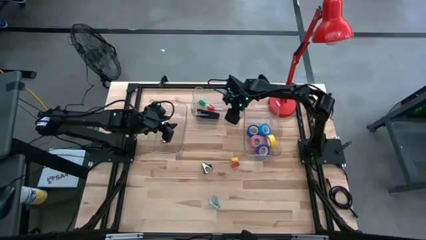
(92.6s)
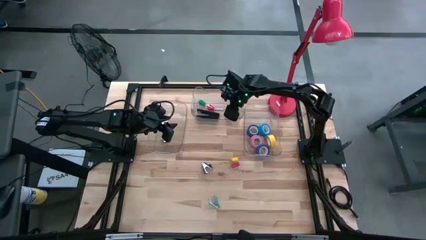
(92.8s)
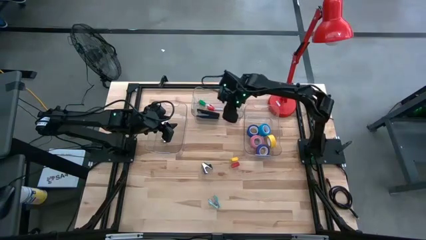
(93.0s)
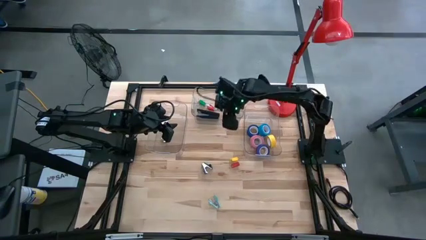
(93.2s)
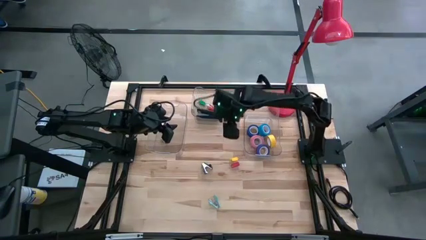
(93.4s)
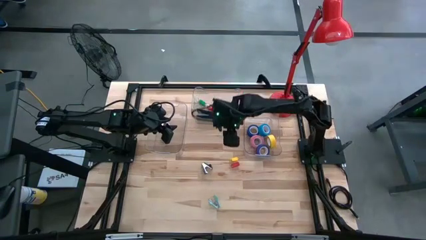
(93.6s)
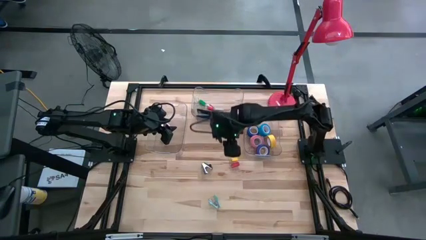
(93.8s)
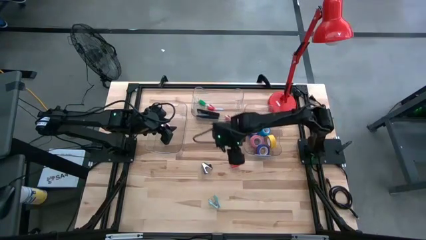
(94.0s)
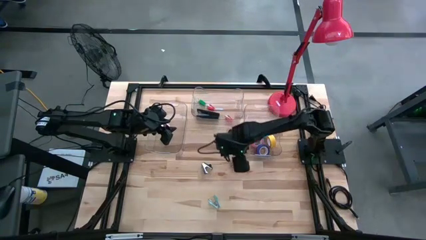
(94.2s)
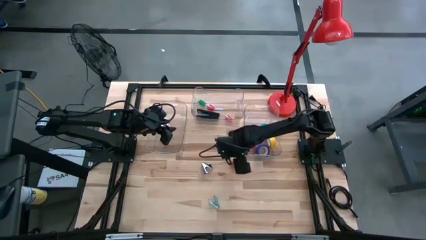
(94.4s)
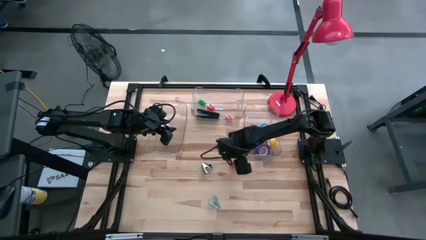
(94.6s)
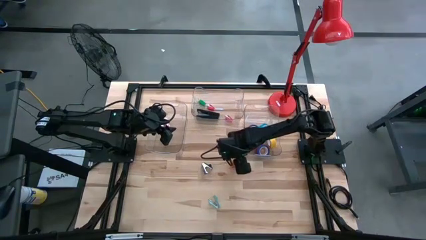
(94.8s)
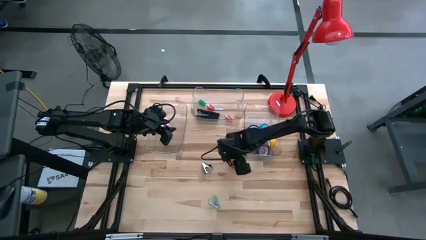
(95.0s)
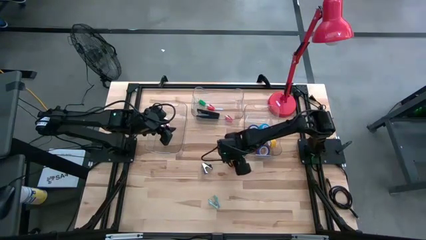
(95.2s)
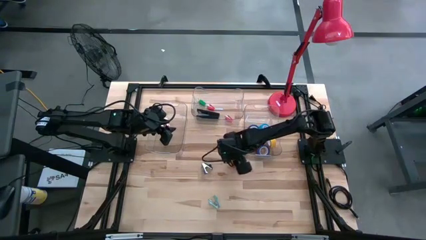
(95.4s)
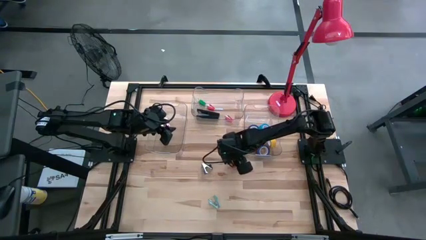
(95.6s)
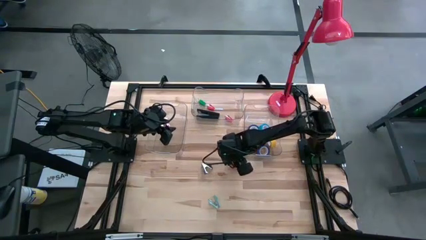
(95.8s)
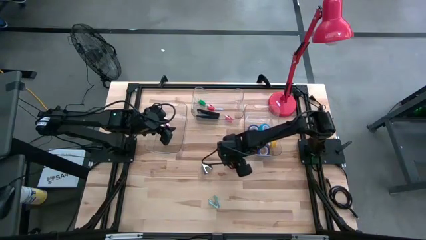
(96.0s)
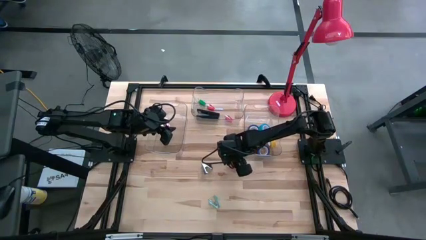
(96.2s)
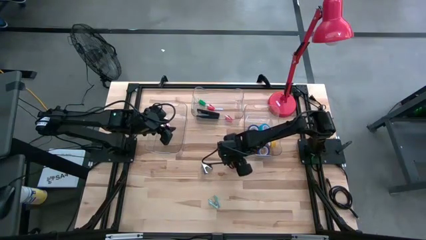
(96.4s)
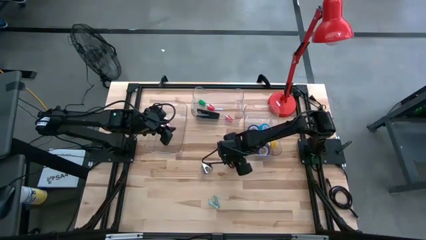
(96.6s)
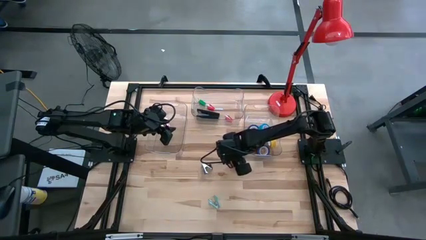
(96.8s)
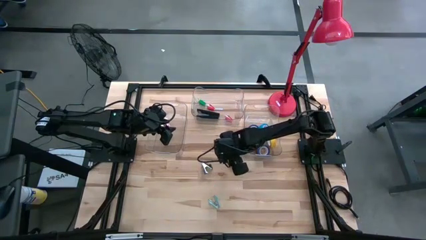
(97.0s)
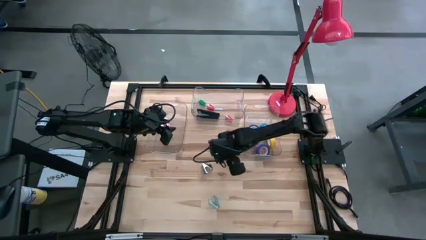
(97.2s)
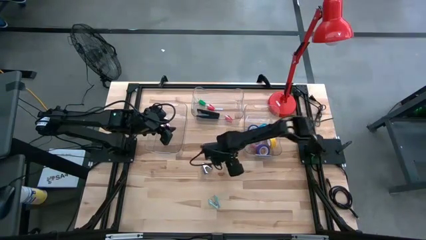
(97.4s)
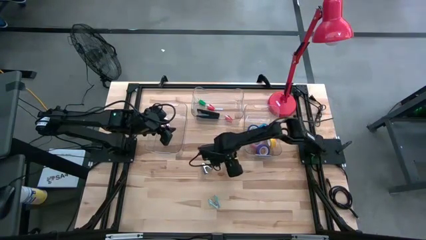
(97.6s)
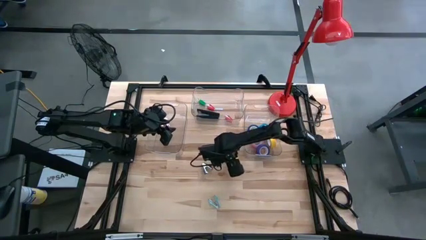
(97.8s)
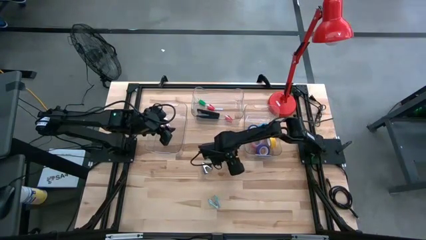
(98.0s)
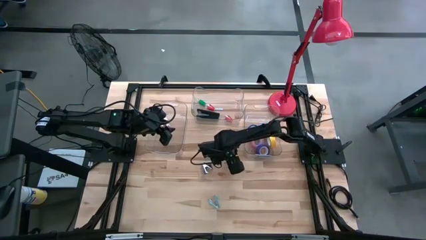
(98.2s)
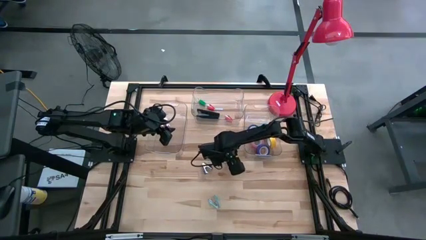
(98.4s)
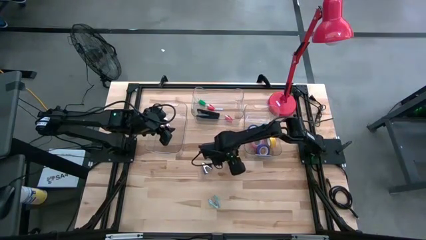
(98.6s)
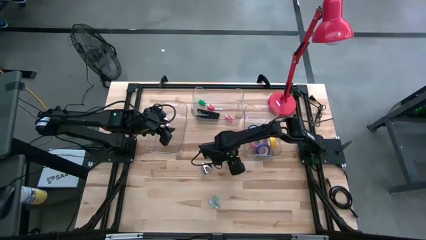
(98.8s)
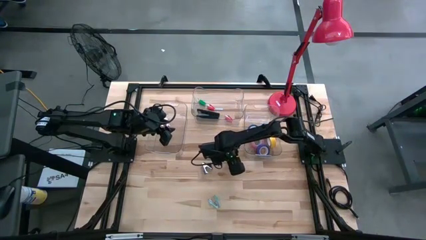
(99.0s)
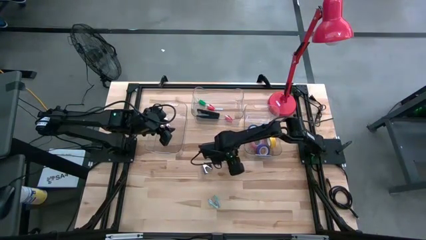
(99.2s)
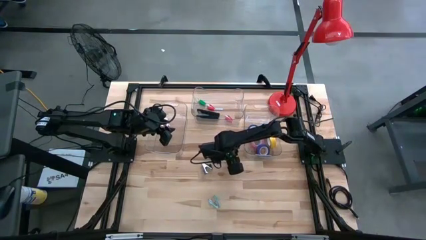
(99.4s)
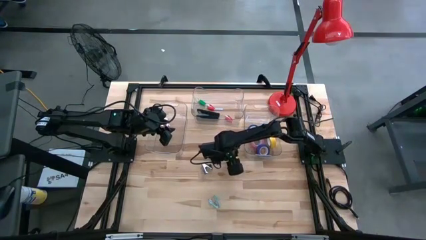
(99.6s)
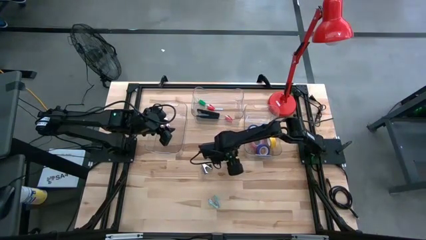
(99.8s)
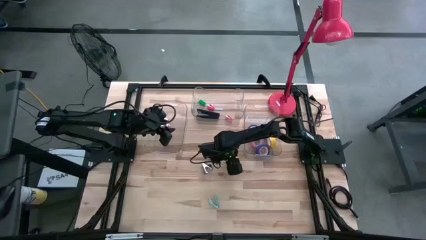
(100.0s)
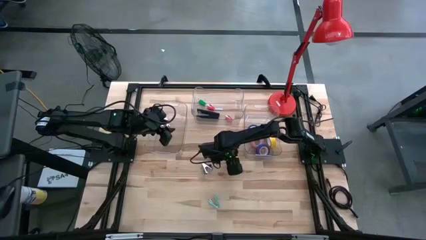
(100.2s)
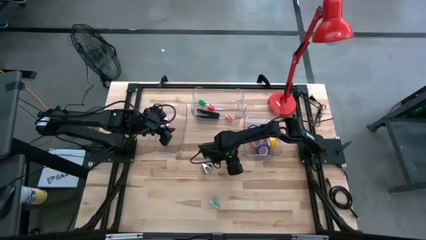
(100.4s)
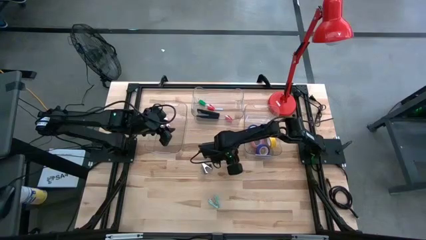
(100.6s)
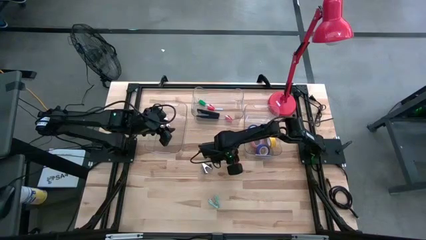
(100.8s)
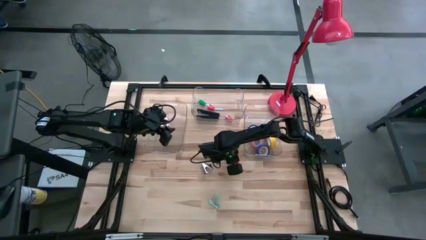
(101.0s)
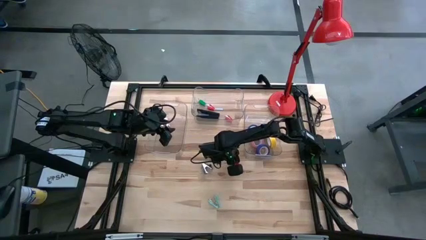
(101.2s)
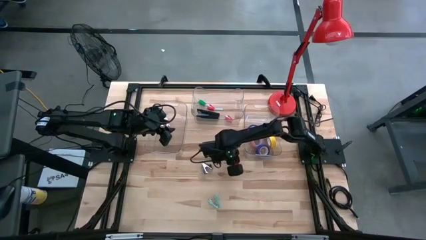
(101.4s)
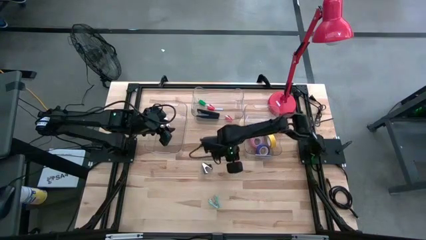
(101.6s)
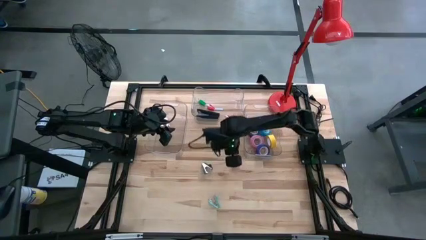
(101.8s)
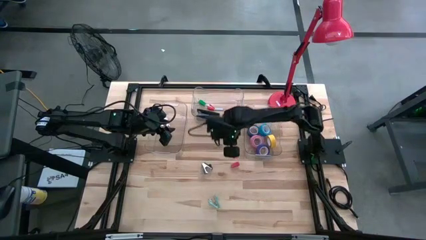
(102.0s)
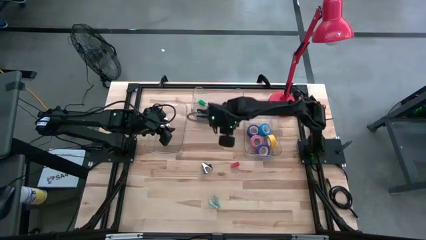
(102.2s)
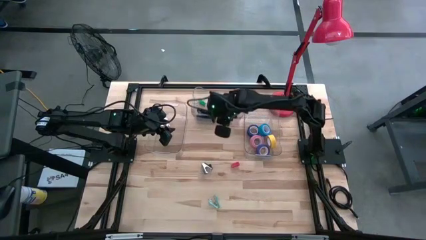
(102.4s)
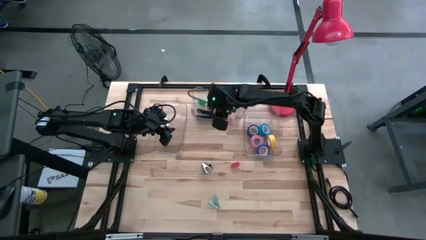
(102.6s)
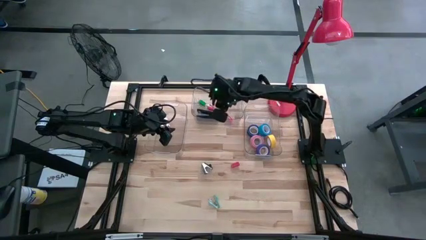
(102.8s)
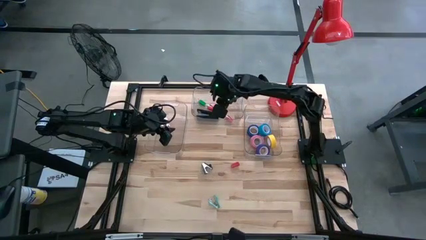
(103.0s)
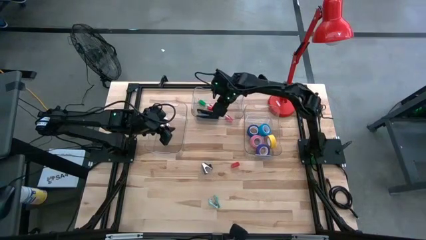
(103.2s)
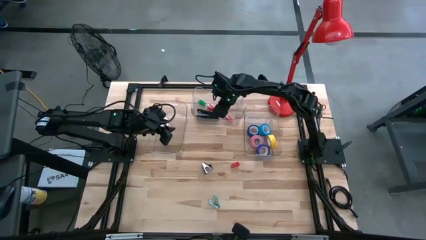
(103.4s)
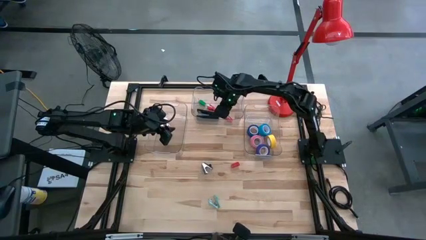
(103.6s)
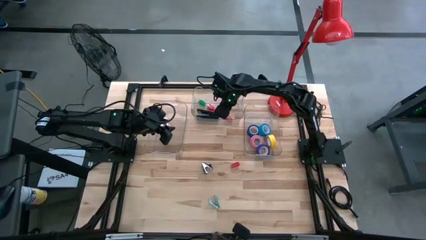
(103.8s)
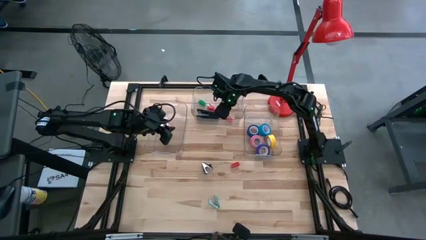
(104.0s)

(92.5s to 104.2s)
Task: Pick and place Stapler, Stapler remover, tape
Put the yellow stapler into the top transparent bin

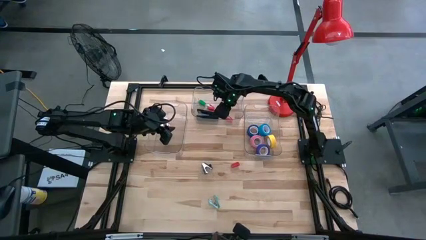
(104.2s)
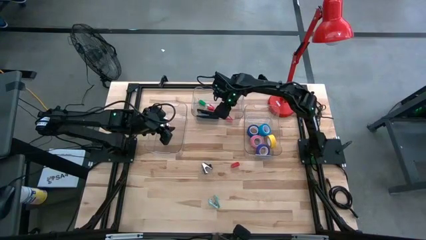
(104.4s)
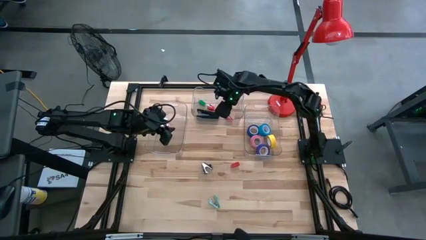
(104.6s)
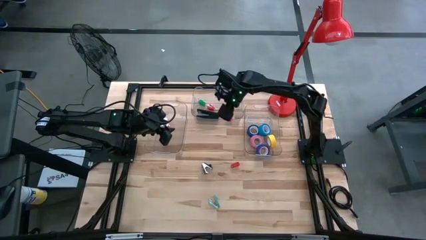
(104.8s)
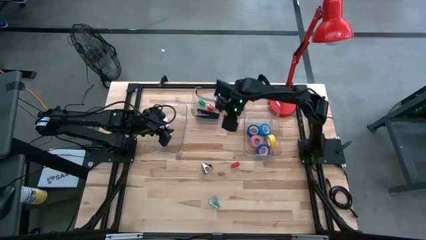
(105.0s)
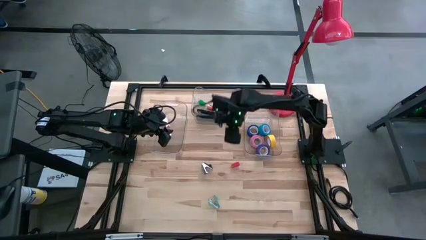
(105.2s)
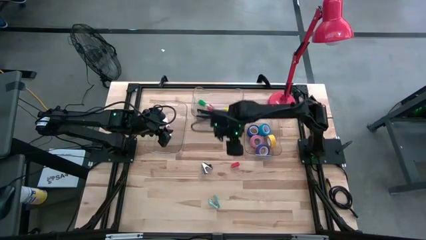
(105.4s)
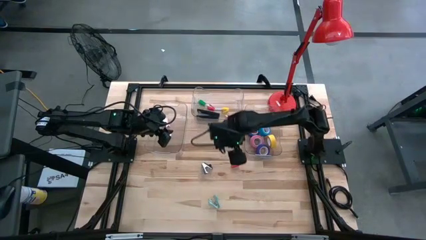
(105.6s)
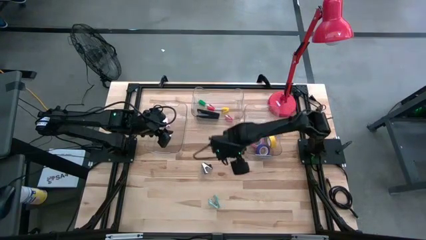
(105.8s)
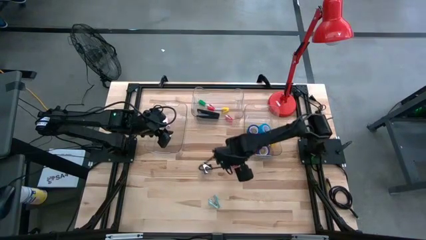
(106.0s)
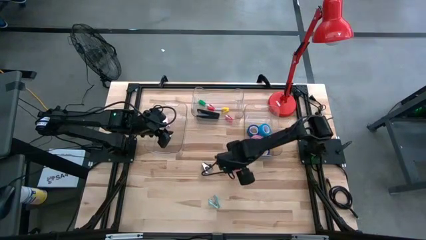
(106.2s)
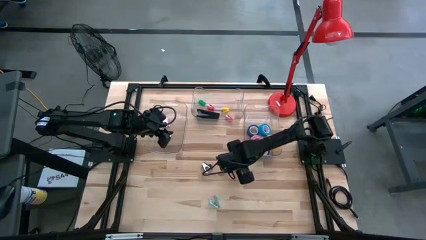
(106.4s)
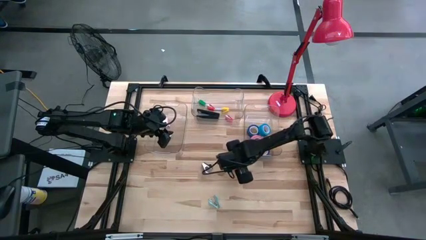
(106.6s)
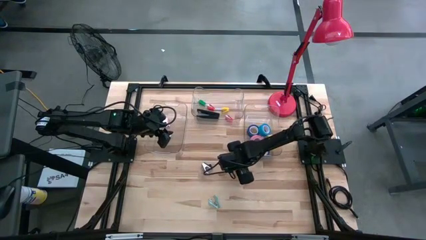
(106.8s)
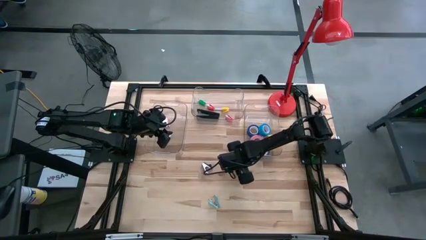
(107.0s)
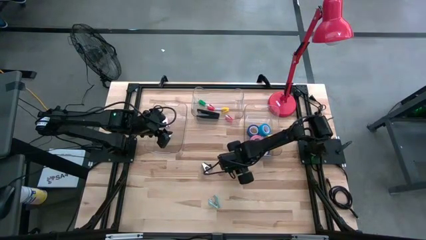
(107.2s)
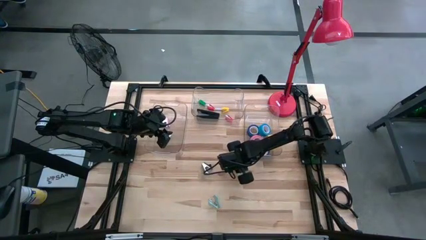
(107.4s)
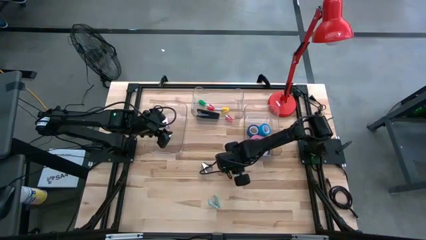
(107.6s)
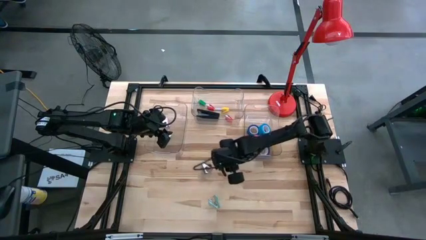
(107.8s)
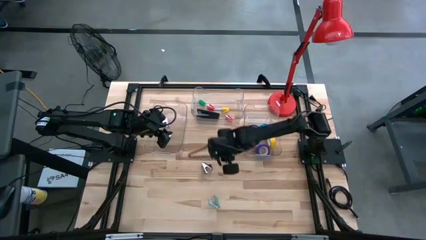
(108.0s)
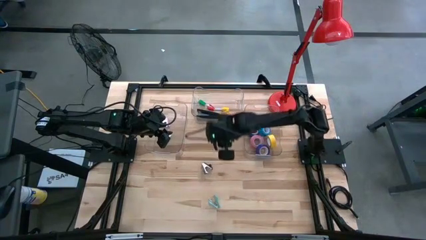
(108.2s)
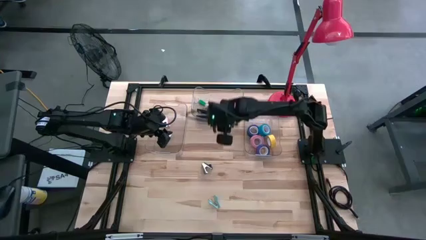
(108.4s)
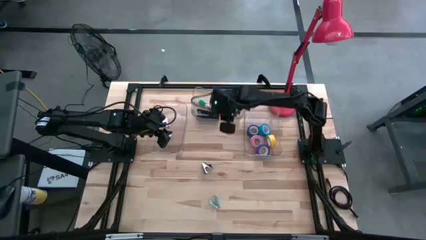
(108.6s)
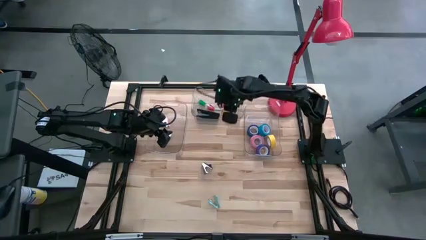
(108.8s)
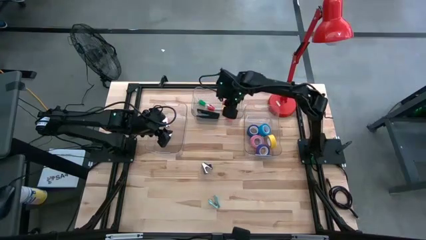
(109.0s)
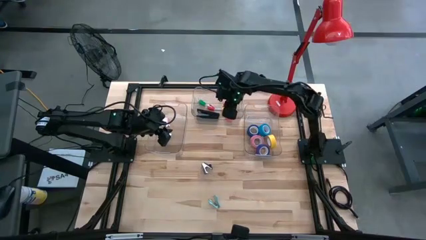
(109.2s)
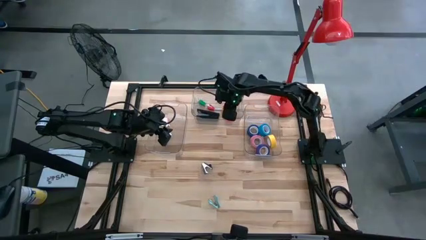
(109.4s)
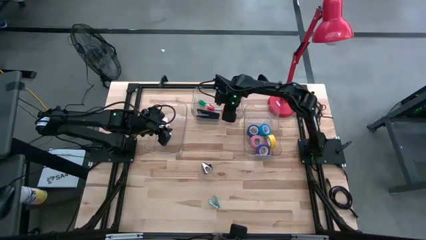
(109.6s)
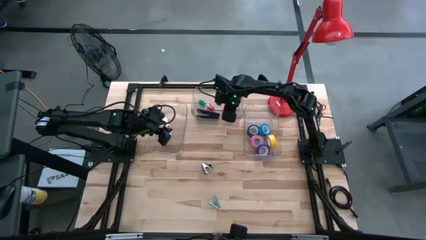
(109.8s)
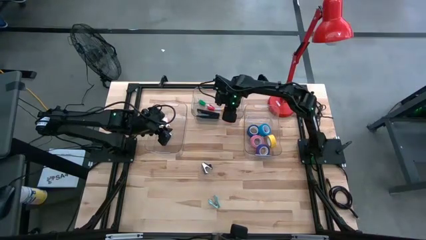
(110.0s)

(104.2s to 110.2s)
Put the red stapler into the top transparent bin
